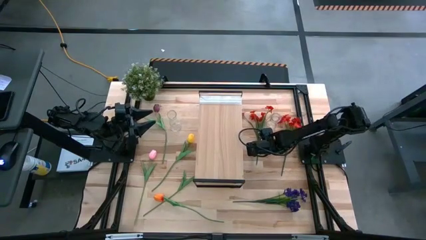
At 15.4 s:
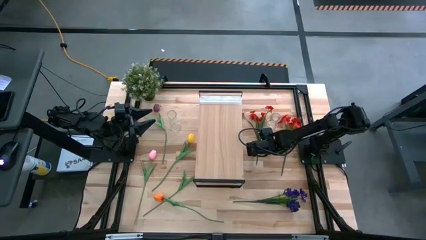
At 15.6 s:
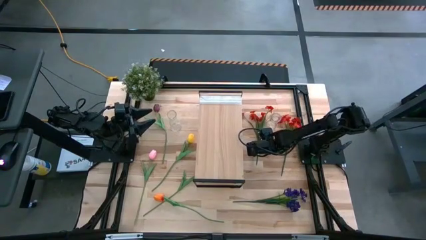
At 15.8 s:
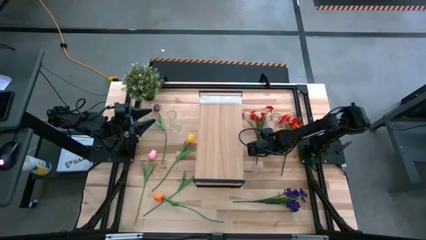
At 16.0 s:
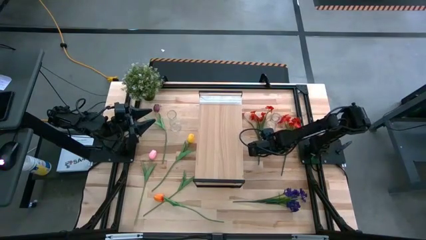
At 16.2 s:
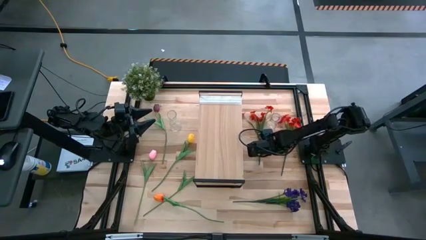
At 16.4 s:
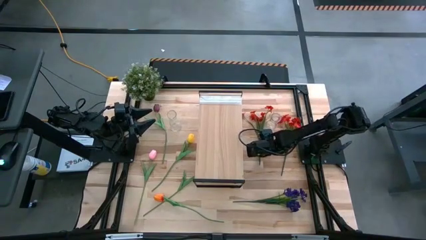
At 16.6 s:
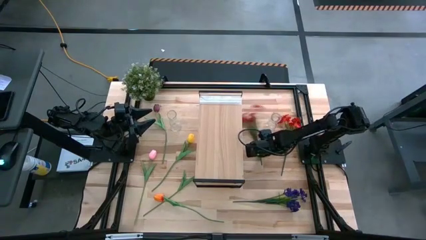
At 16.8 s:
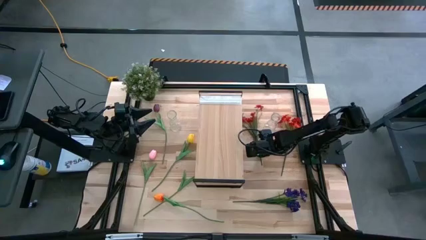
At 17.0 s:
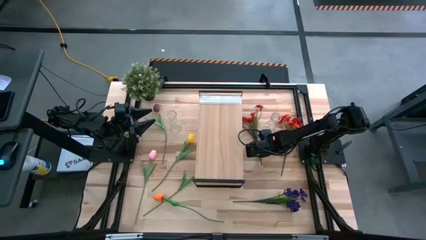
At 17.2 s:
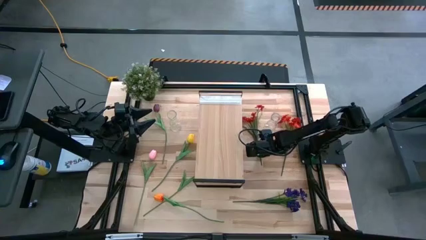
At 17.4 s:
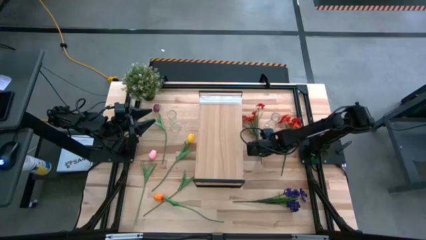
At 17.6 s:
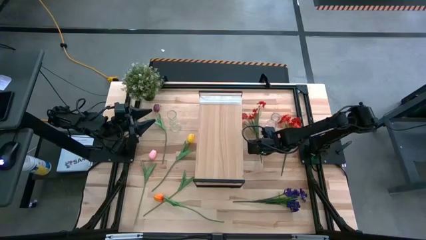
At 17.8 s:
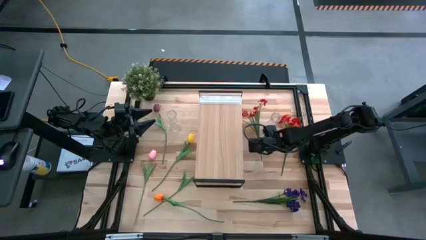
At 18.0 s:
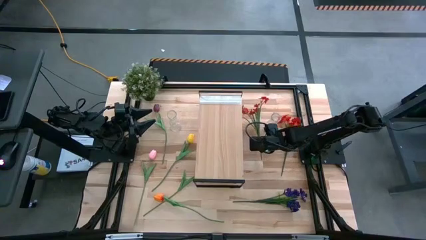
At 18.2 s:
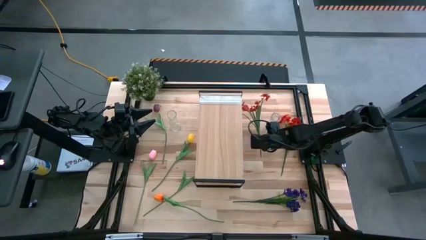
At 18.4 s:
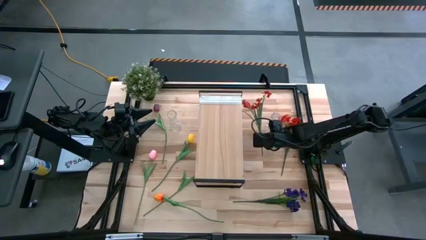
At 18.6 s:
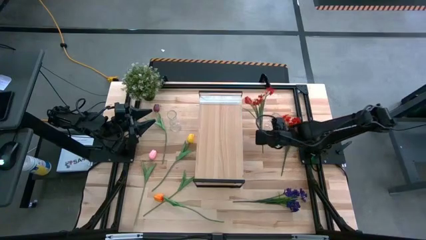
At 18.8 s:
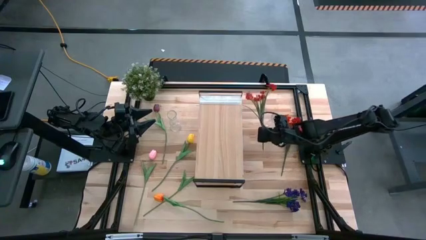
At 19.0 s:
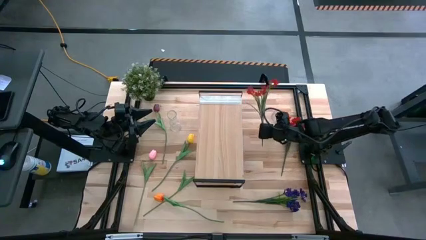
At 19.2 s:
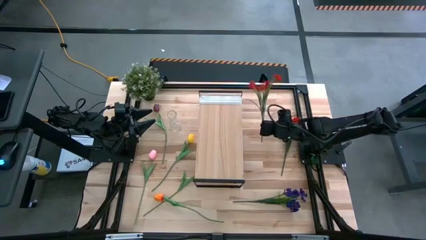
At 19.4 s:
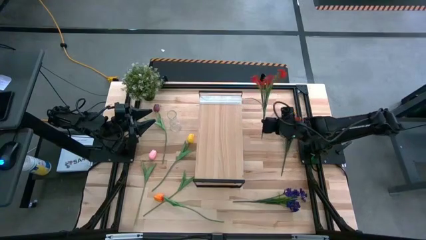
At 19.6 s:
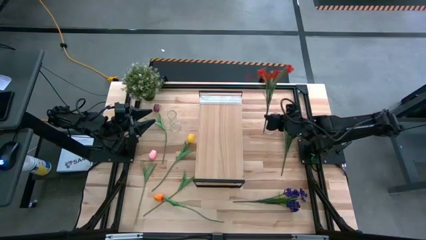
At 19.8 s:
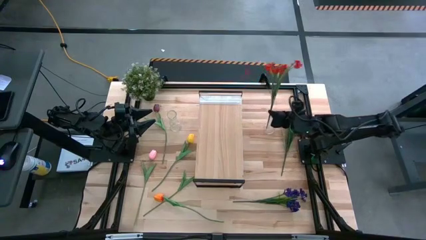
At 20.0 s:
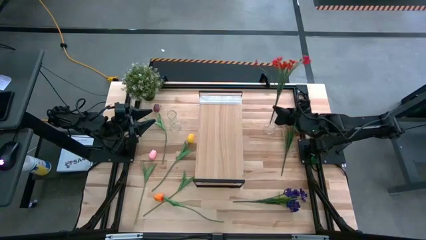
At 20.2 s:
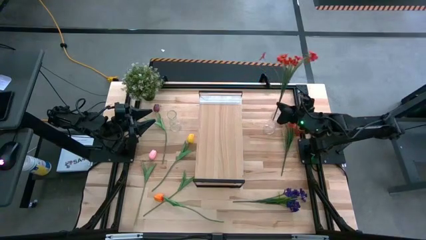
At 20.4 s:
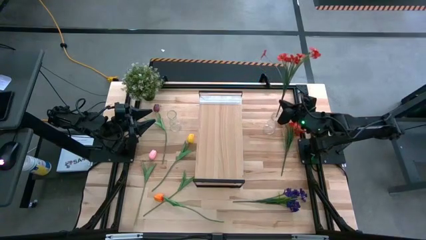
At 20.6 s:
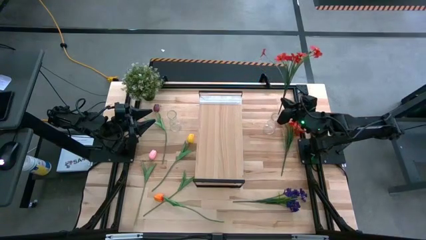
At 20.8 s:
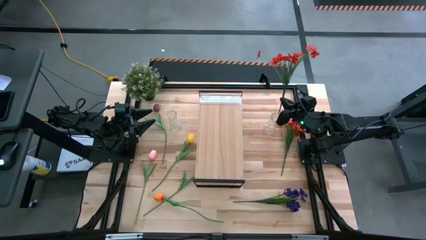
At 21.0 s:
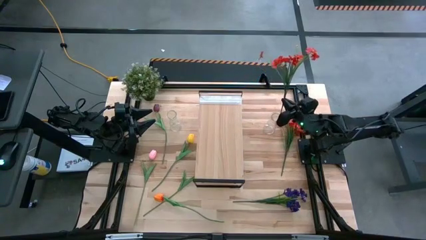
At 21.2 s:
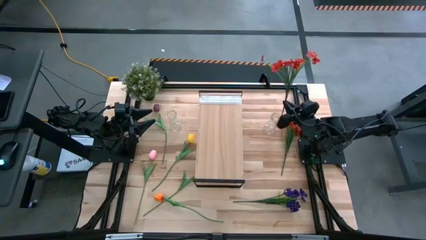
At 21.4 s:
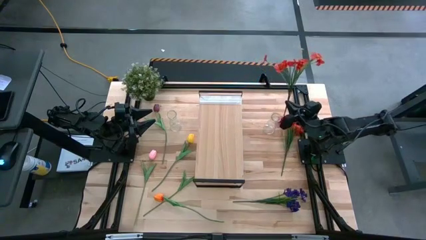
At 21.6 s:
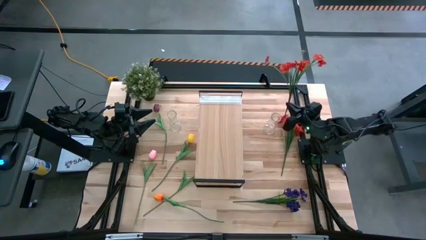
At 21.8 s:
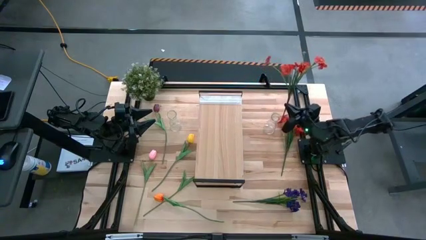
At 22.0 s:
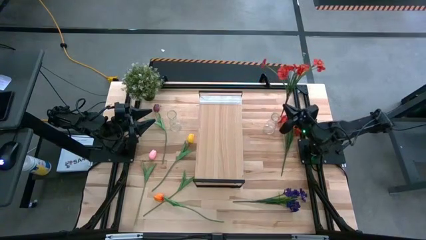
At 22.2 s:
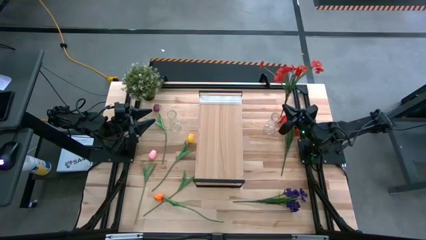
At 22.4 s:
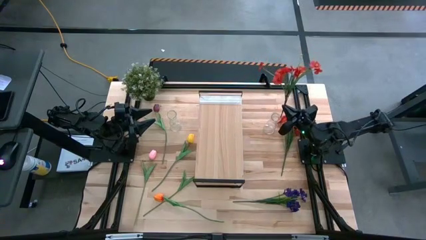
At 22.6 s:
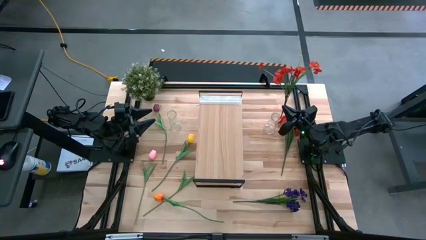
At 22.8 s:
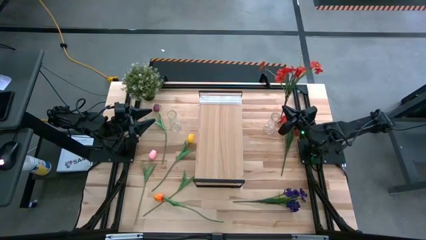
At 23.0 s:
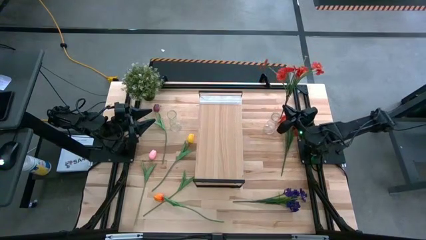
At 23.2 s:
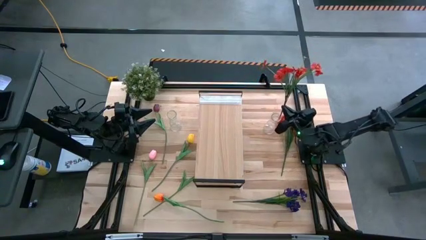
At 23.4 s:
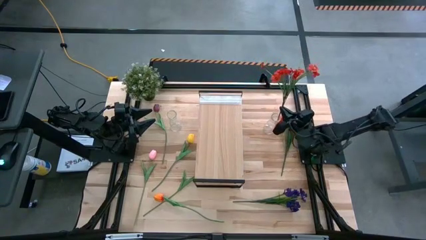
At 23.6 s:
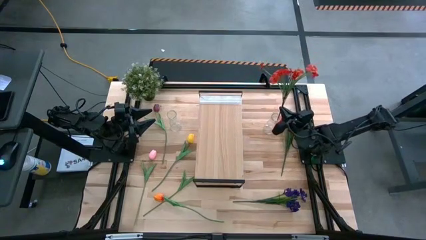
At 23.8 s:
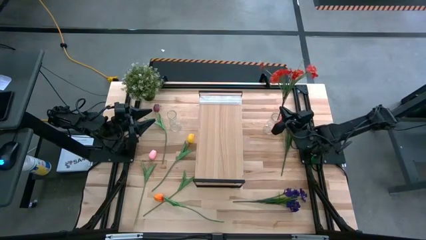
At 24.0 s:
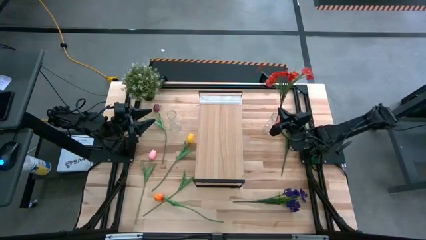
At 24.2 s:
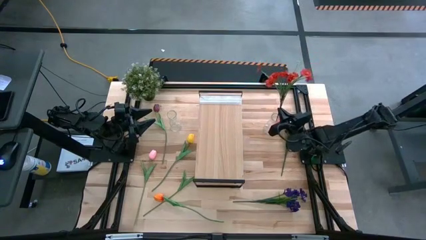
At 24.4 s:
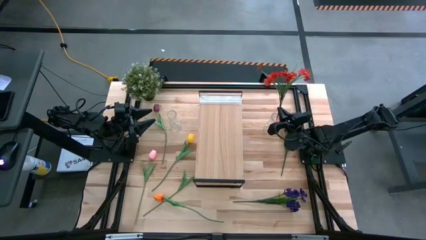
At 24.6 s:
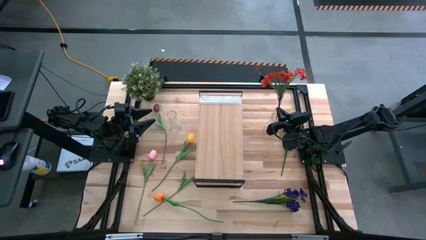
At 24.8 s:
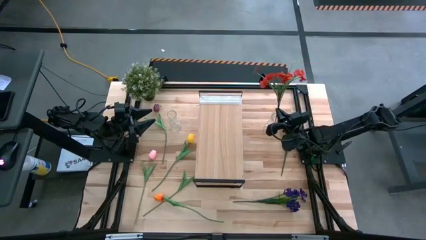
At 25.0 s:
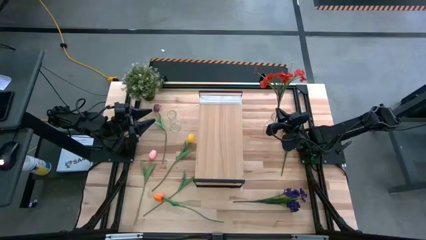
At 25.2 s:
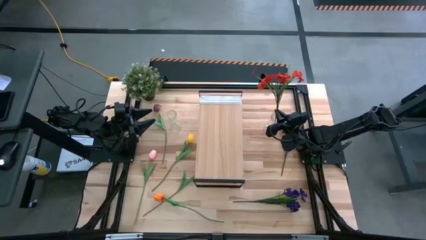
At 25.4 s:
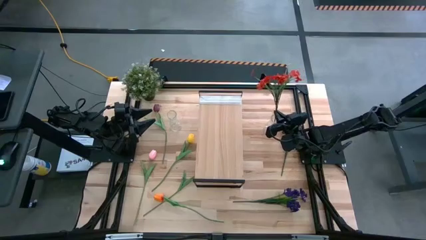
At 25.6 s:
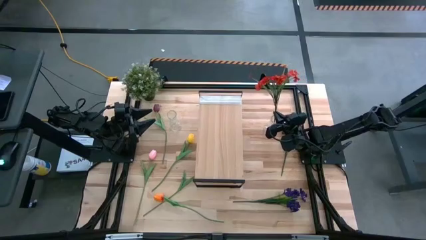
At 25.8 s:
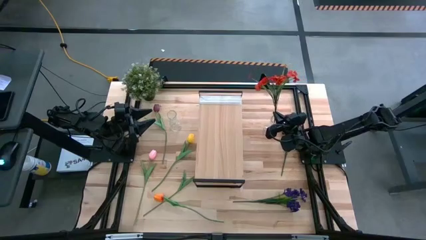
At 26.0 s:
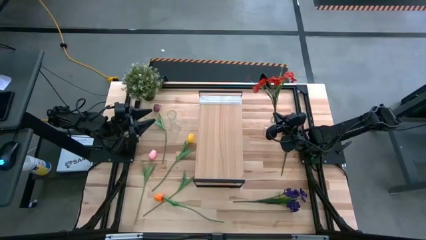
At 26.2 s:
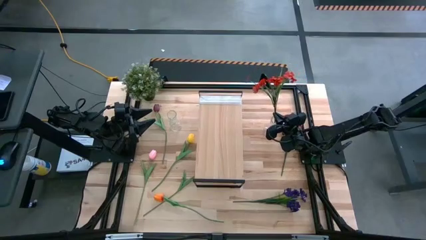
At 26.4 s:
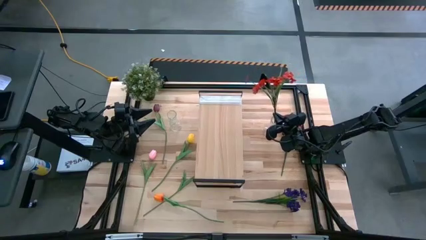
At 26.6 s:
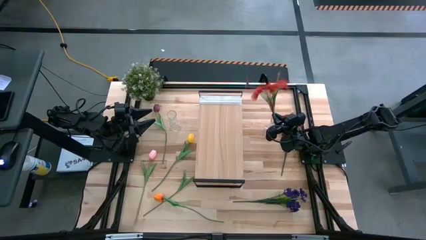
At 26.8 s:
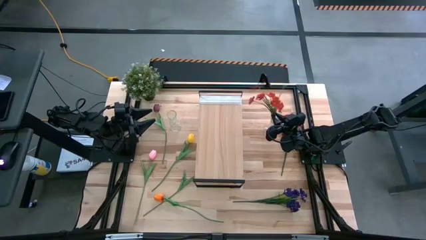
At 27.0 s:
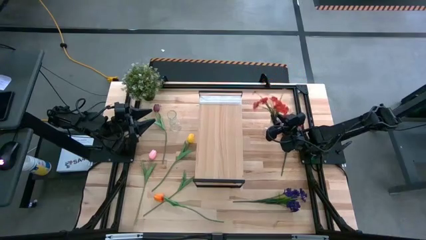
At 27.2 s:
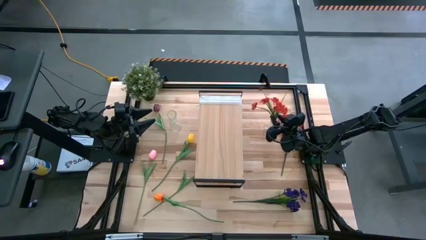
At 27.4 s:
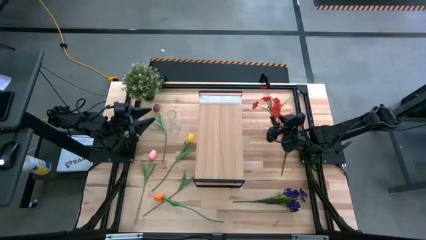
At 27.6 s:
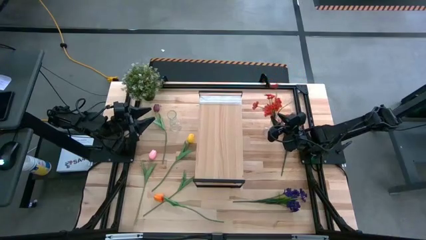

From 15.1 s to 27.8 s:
Task: Pick and place flowers into a vace then onto a shelf
Put the left red flowers into the right transparent vase

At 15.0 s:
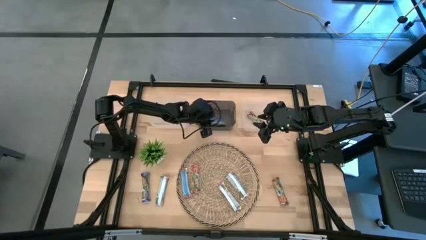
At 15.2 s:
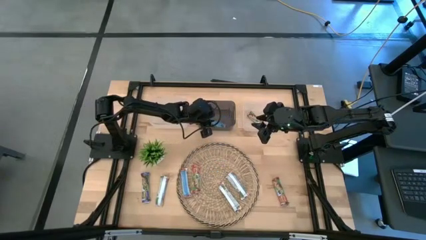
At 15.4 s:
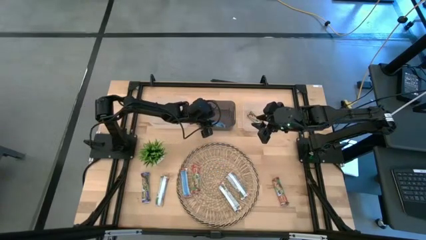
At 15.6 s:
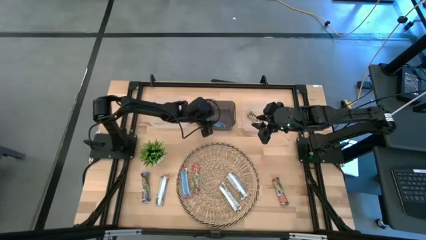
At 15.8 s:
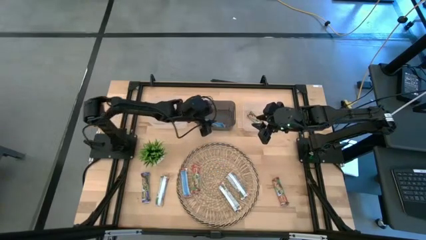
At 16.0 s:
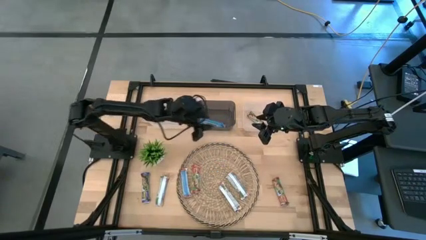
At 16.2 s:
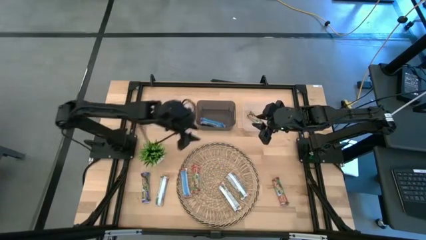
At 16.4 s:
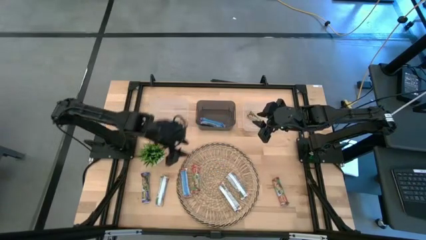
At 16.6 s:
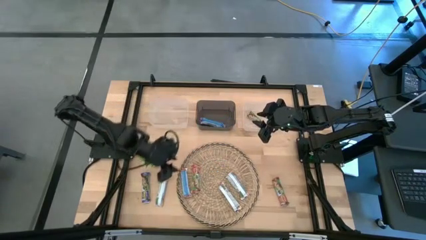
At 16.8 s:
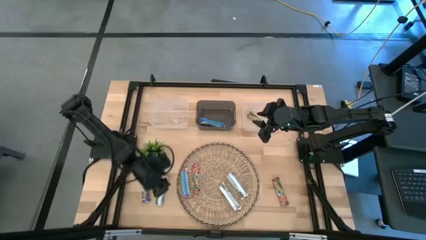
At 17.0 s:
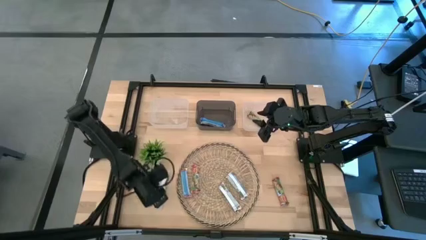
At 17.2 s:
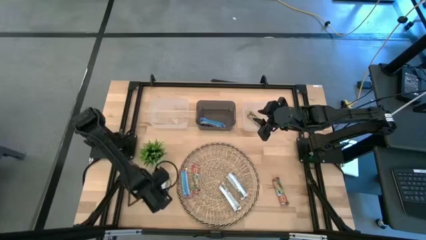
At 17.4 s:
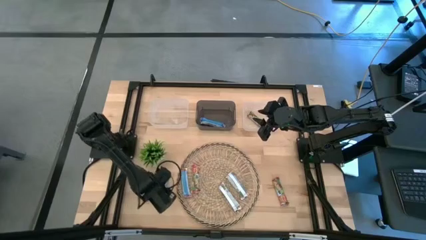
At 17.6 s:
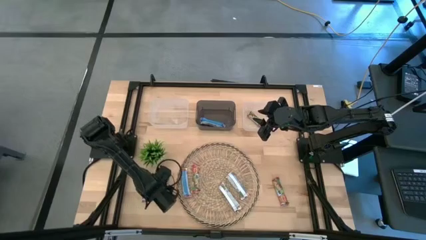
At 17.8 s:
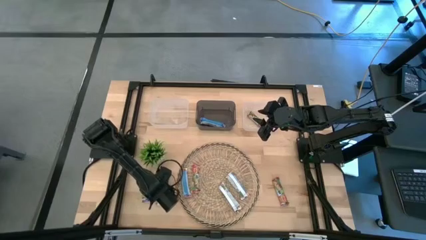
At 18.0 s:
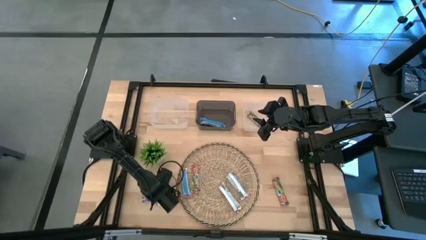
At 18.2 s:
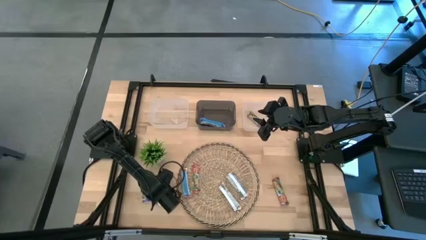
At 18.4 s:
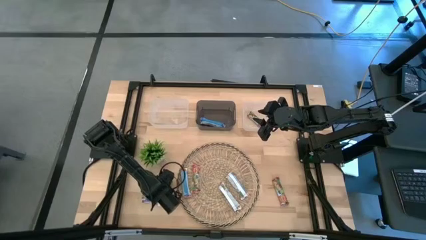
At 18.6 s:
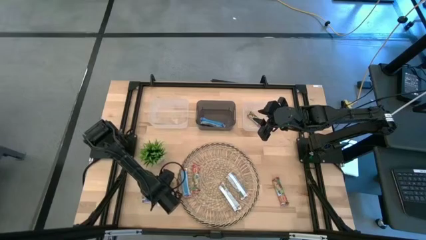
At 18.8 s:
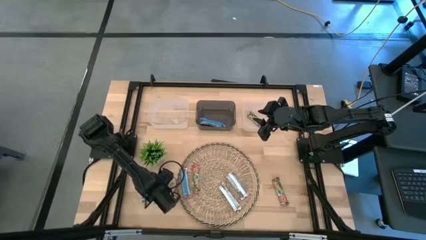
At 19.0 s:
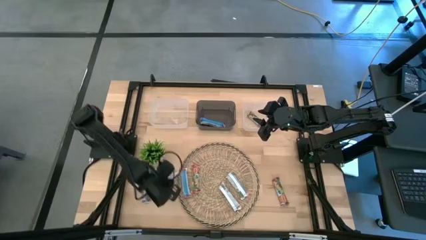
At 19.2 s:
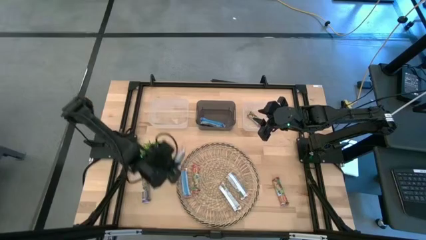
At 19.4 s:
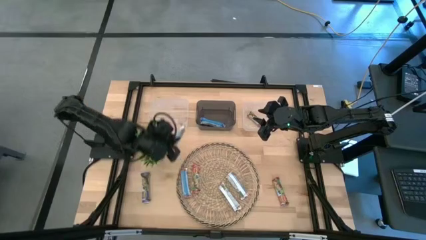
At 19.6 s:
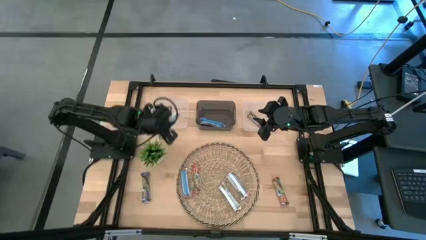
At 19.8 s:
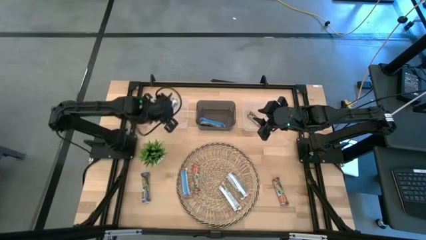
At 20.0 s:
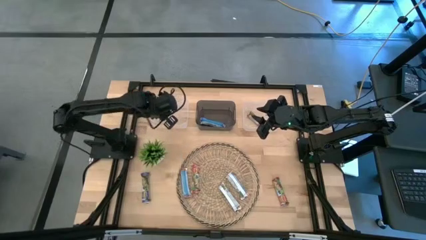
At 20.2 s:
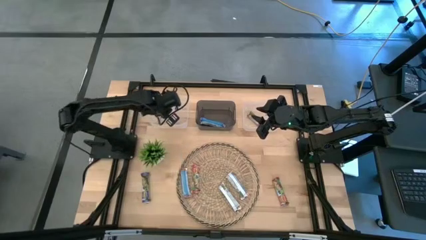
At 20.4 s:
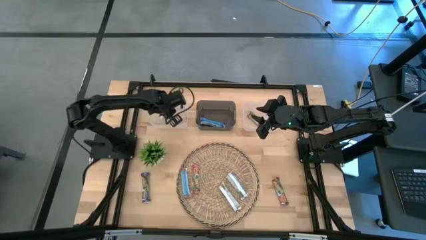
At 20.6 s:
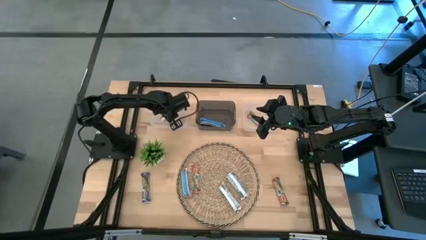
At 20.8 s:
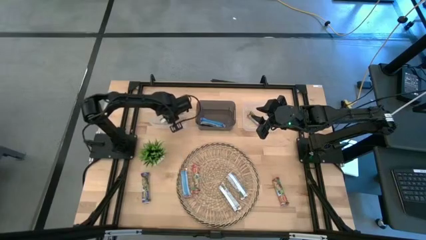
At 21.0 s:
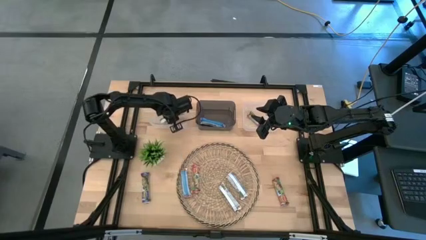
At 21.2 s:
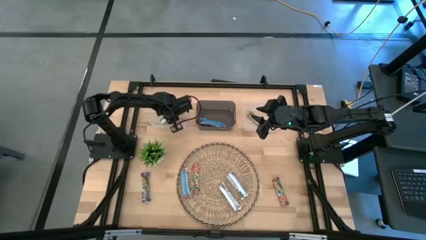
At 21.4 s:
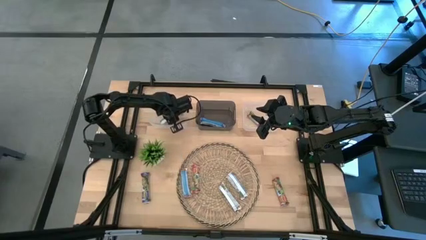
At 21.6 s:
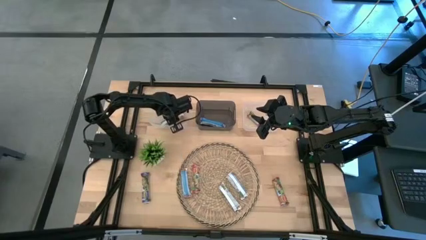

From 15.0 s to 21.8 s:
Task: Pick and place Granola Bars by type
Put the yellow granola bar into the left transparent bin
